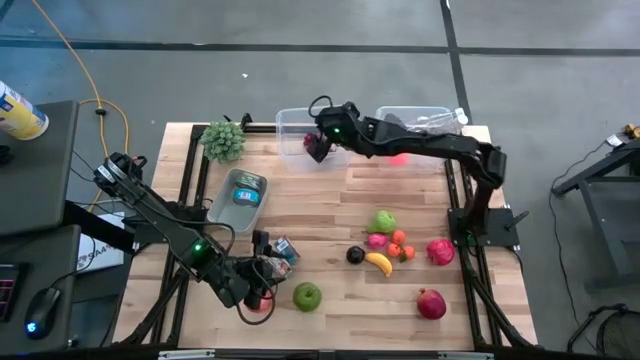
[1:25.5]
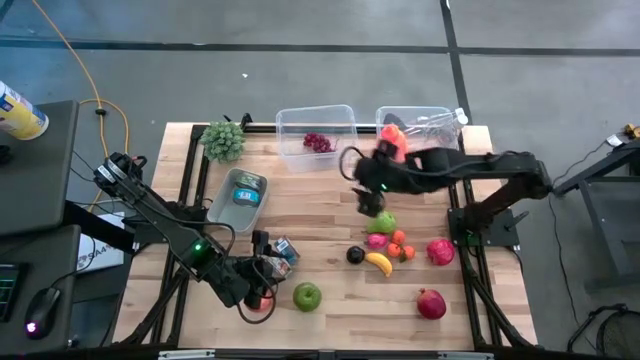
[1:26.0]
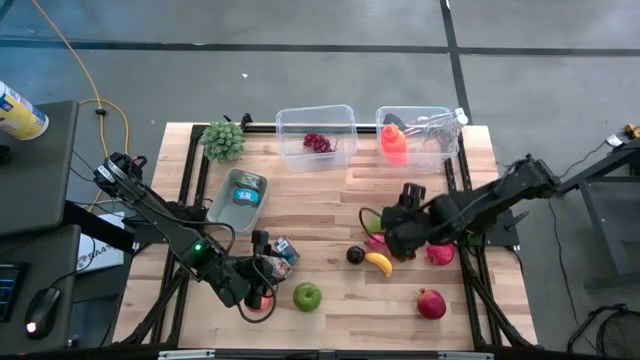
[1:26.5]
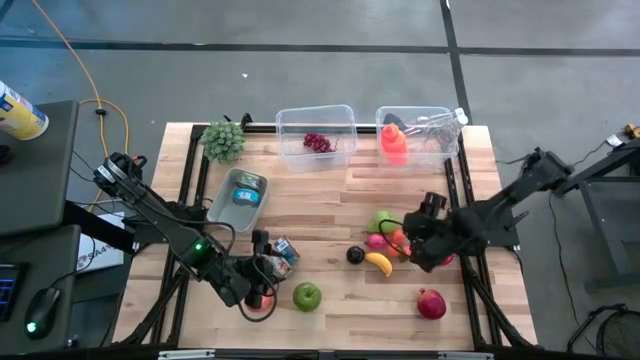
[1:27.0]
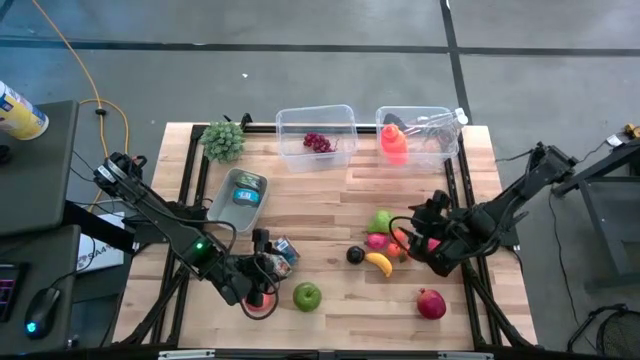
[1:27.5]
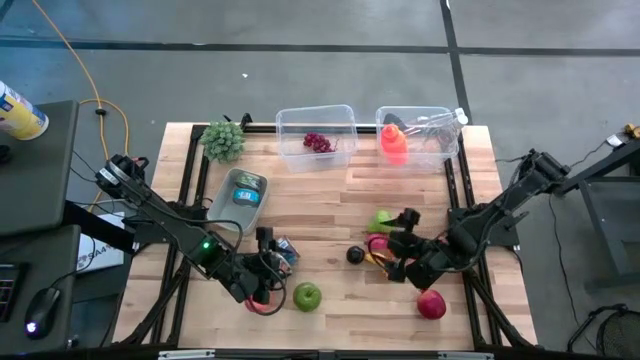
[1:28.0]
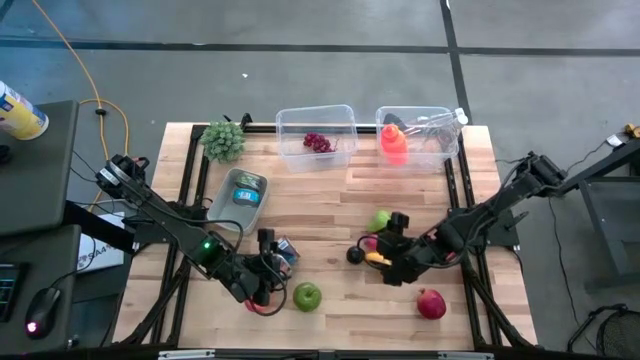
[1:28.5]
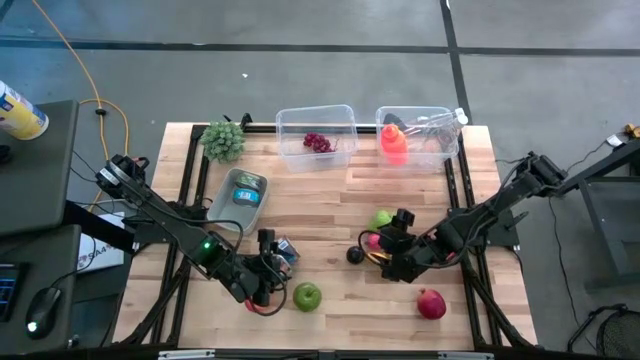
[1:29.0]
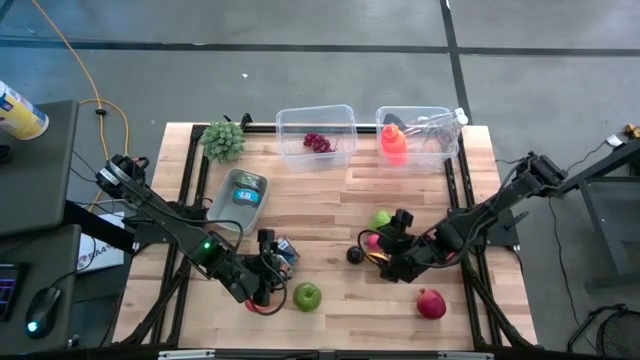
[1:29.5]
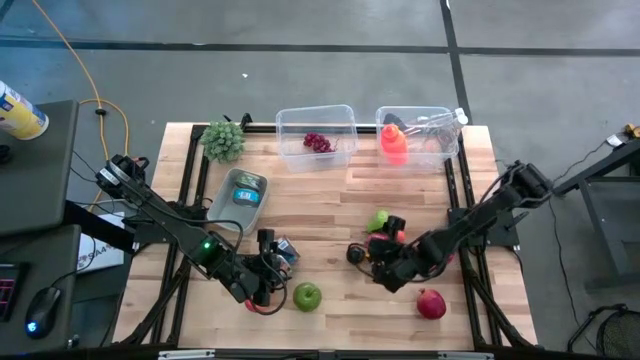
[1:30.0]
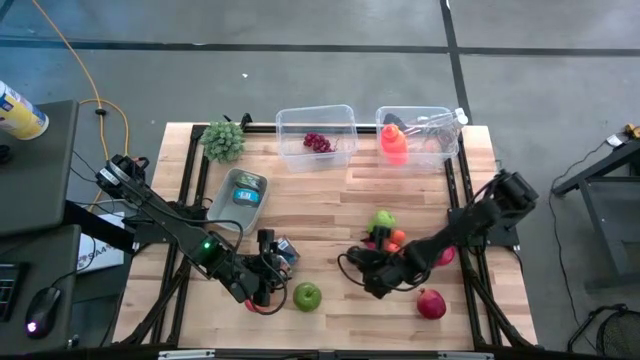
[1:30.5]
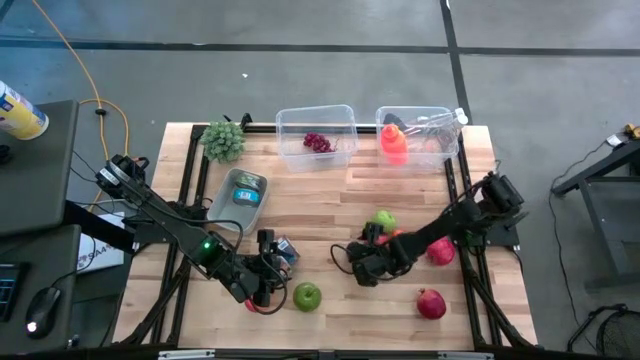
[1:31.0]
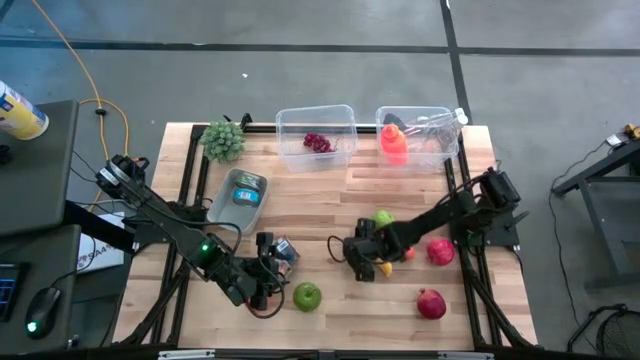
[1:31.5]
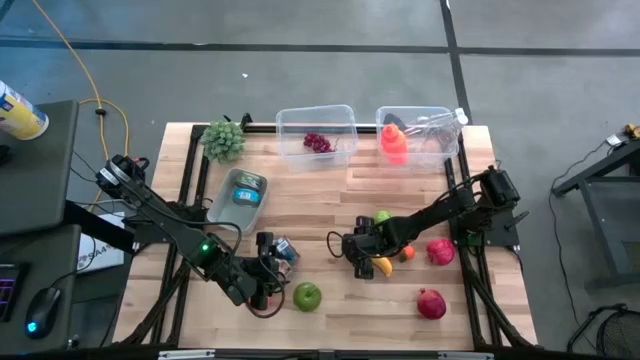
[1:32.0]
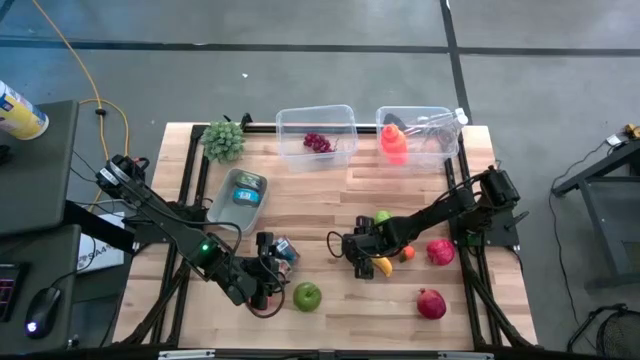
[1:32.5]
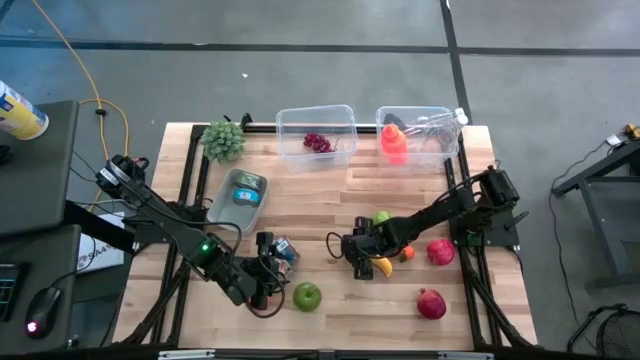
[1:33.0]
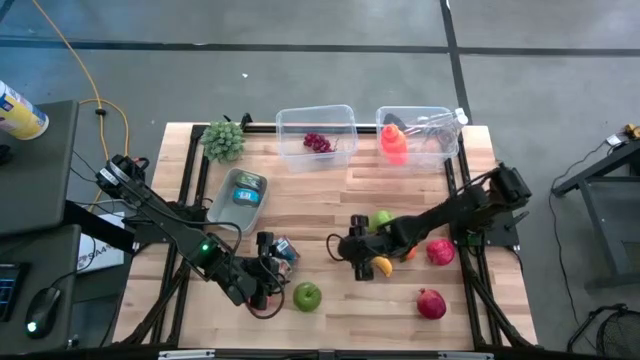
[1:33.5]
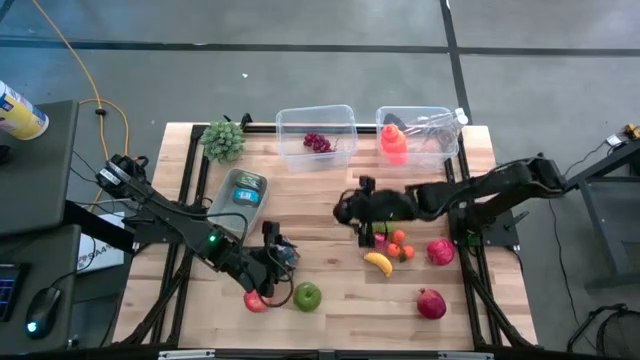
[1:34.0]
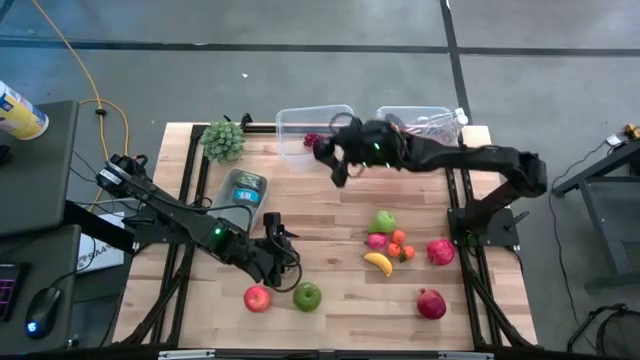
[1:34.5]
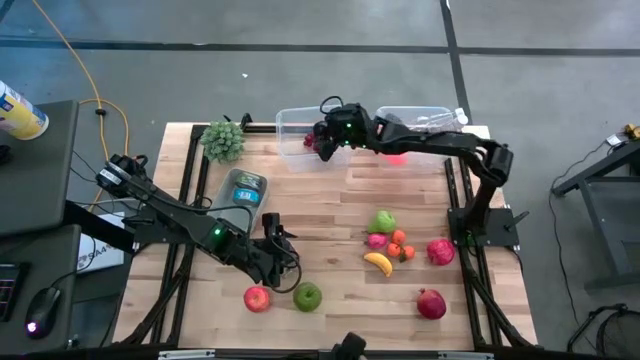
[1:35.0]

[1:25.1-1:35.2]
Task: Pick & Place Food Item
Put the black plum into the left transparent bin

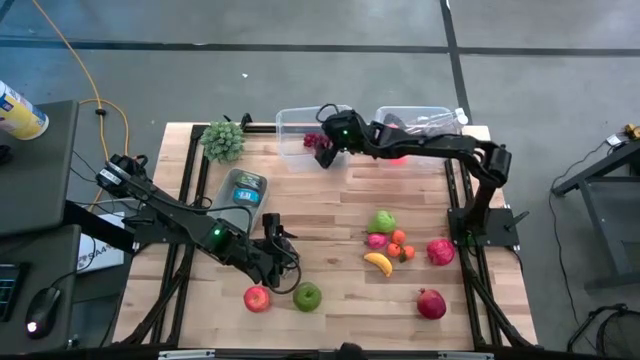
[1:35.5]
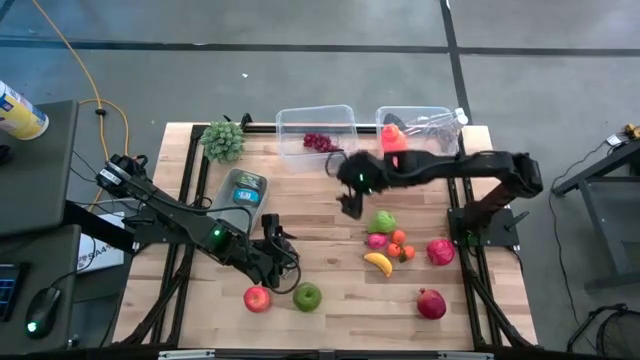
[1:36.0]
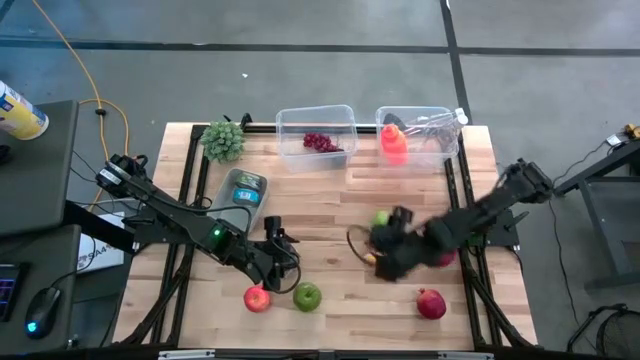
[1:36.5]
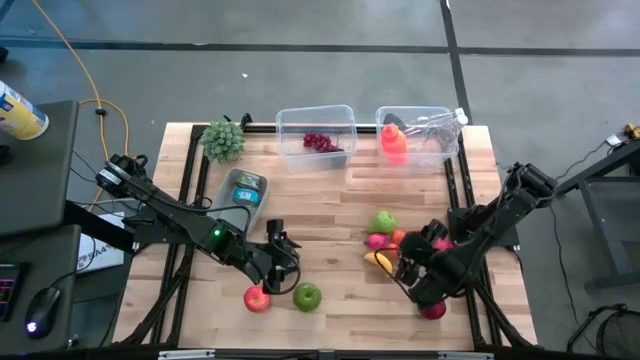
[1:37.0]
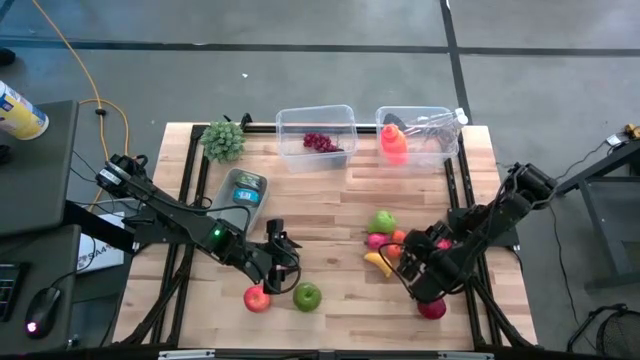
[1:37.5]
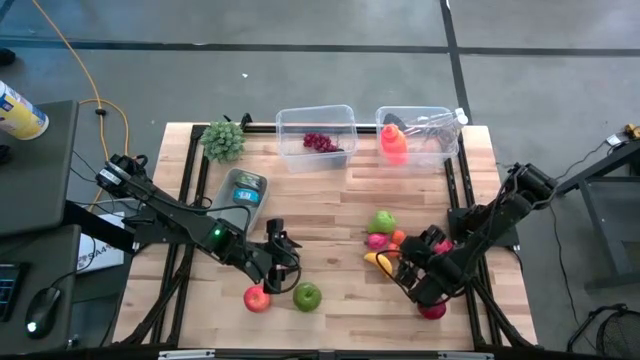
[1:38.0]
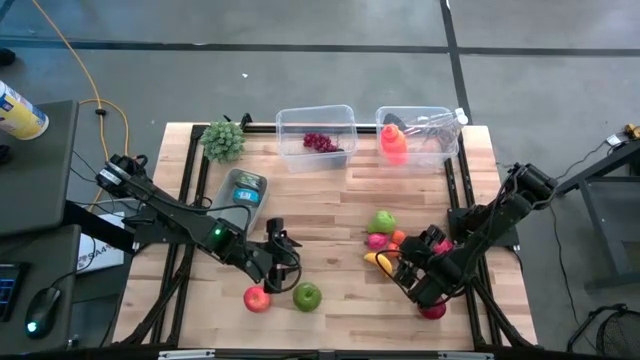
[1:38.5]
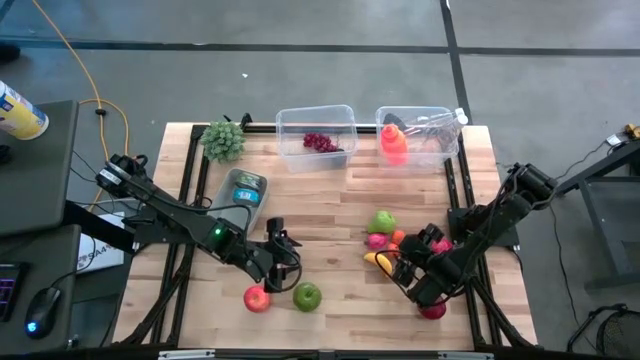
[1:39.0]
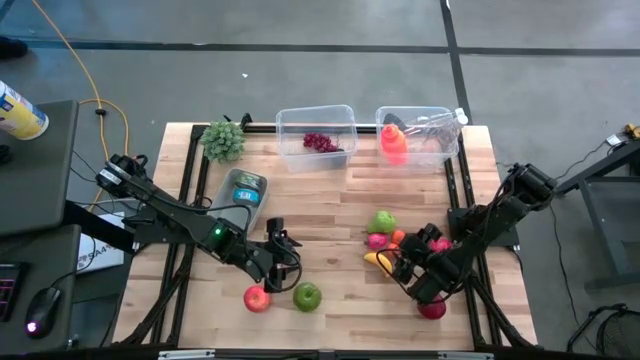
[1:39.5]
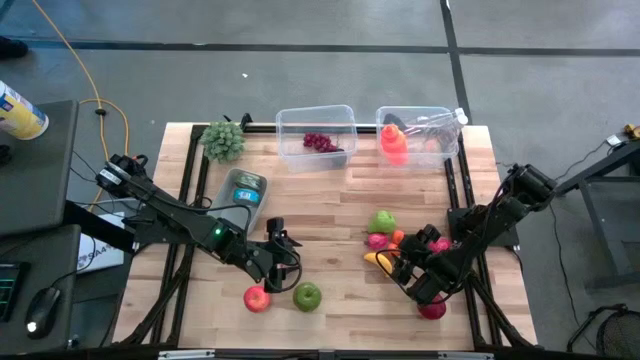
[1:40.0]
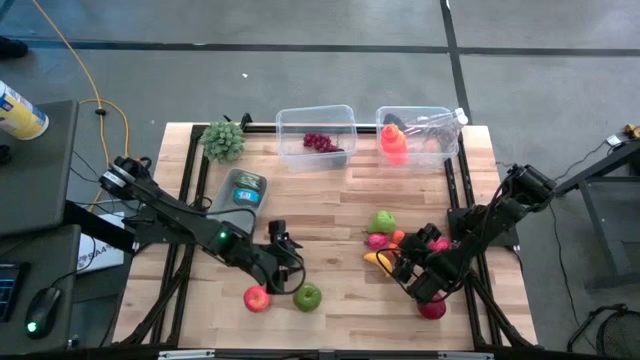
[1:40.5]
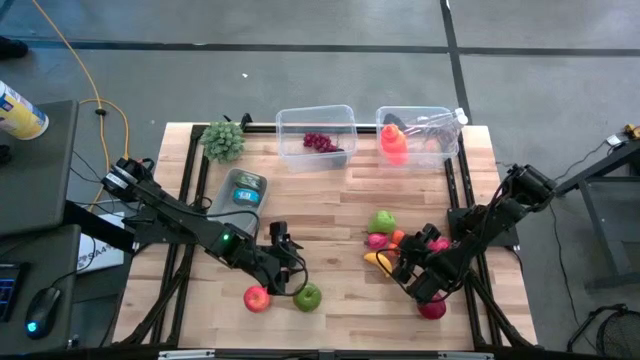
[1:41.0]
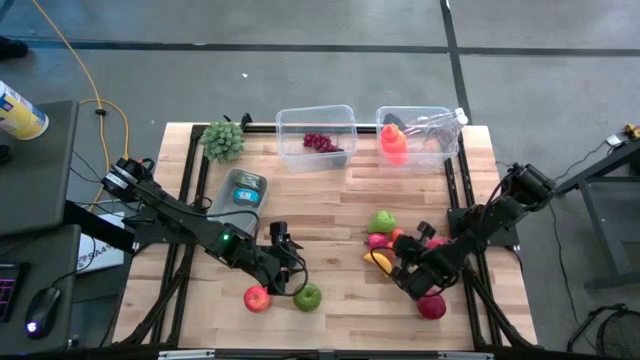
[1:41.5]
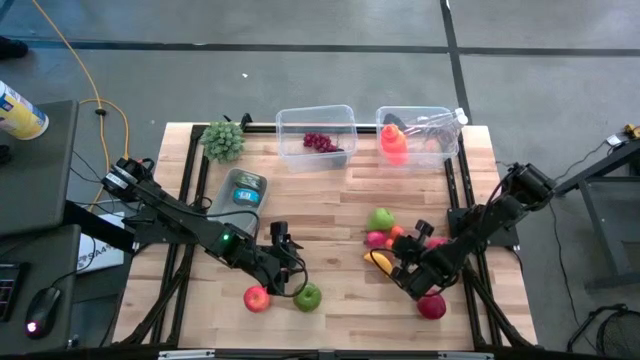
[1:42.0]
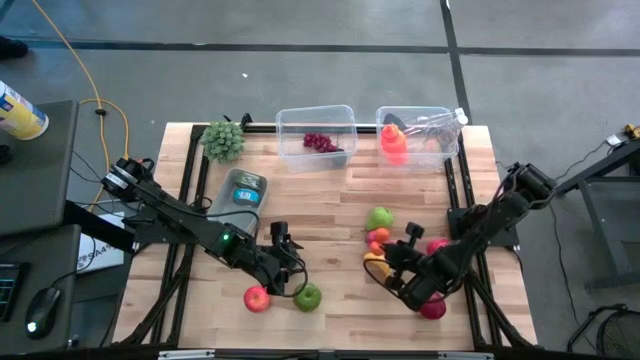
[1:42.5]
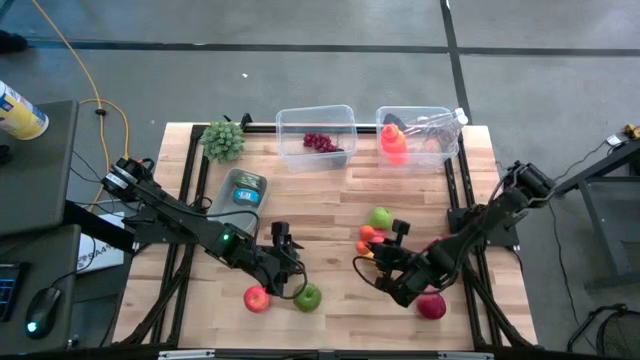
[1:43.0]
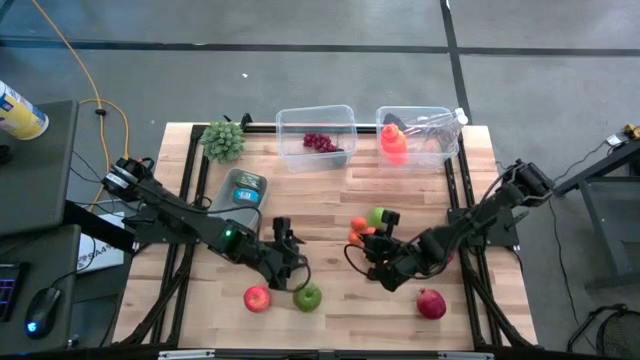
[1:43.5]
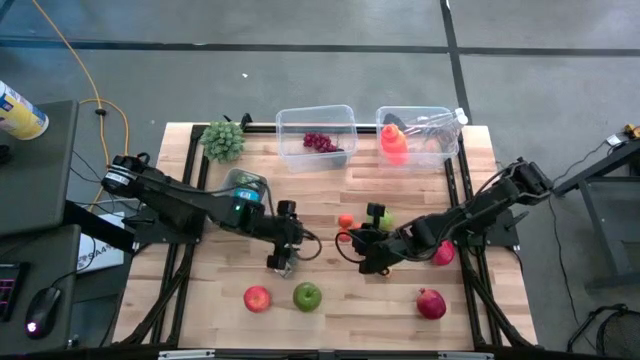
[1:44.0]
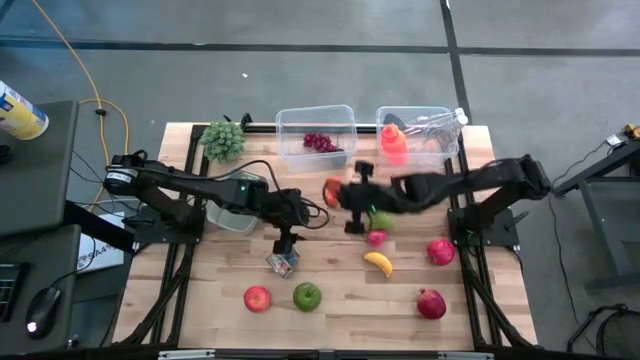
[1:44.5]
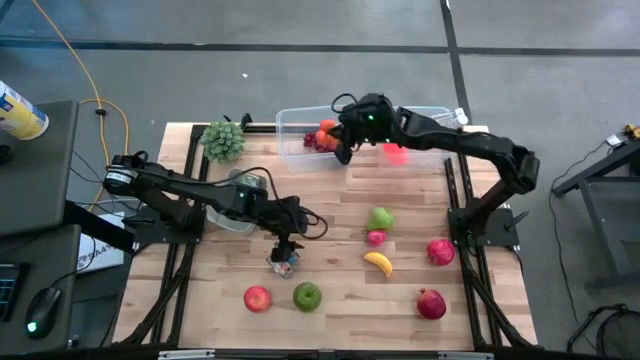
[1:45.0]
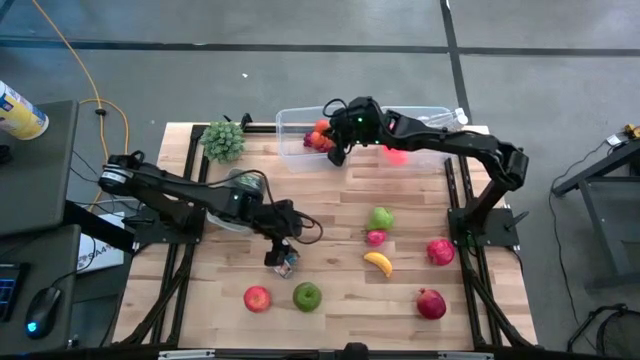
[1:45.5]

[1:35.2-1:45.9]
Put the tangerine into the left transparent bin

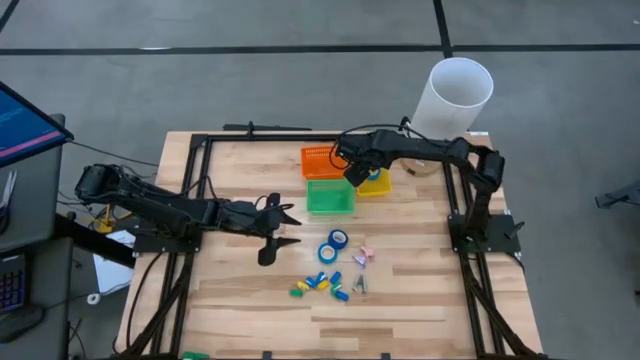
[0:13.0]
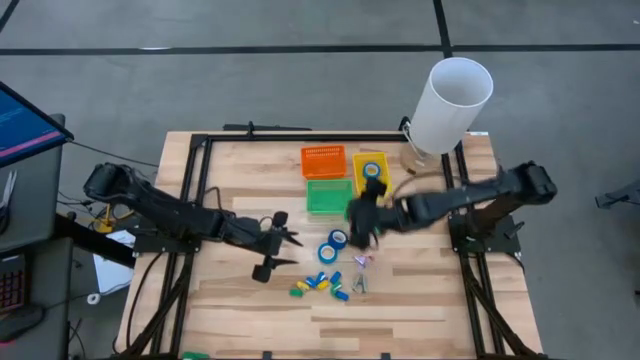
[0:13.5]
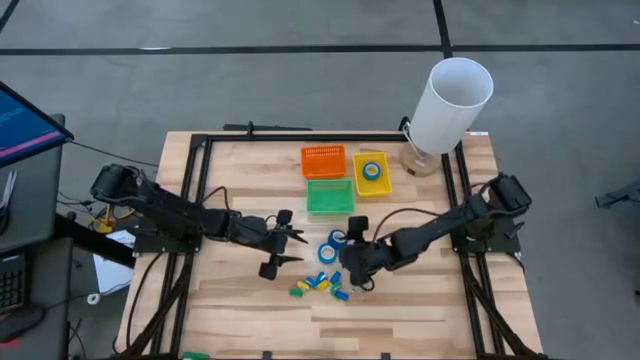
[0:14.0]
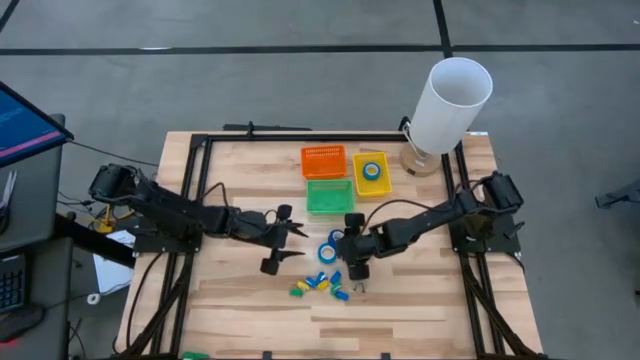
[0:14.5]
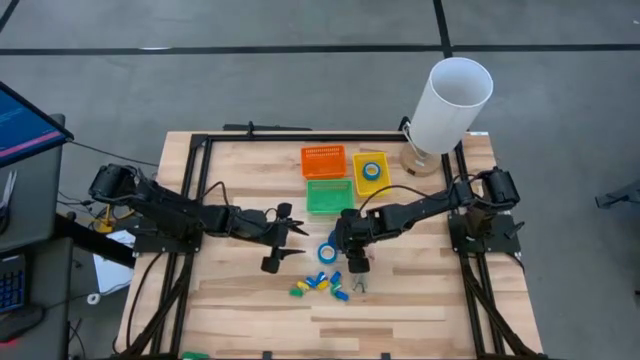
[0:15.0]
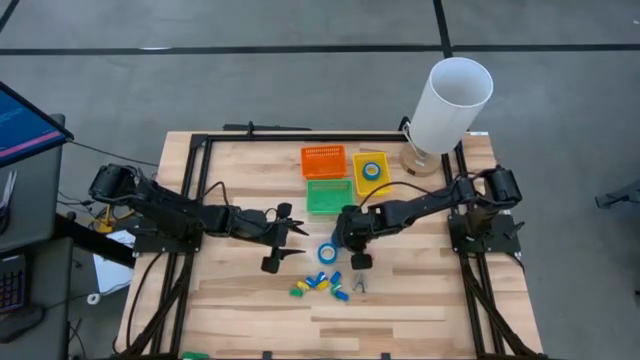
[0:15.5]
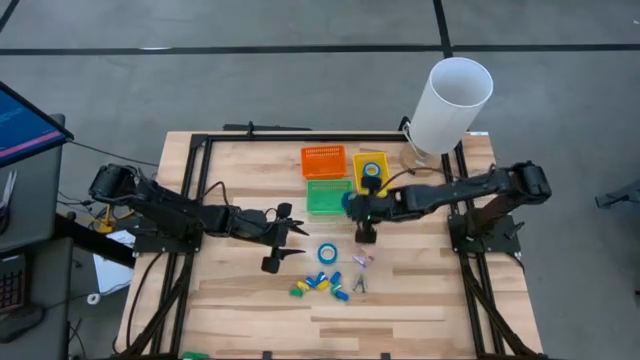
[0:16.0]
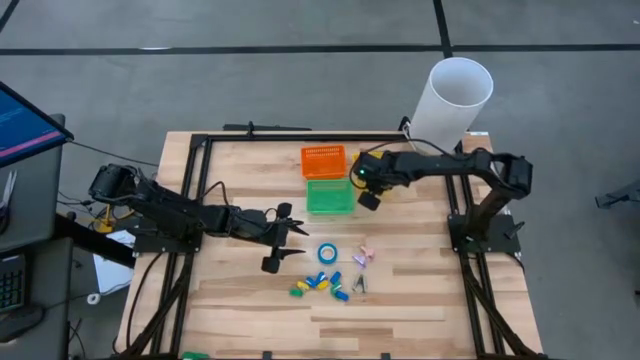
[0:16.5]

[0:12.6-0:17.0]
Task: Pick and place Stapler, Stapler remover, tape
Put the blue tape into the yellow bin
